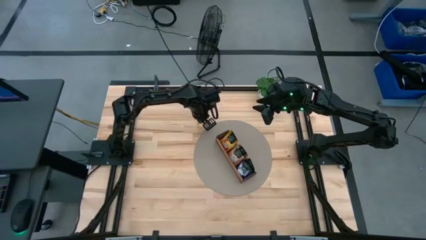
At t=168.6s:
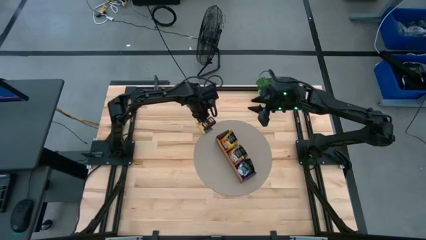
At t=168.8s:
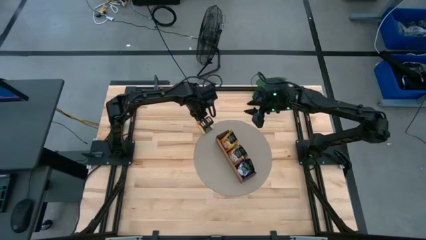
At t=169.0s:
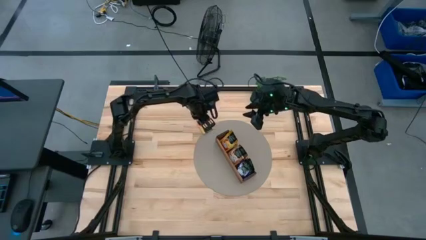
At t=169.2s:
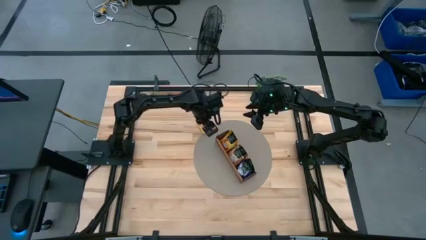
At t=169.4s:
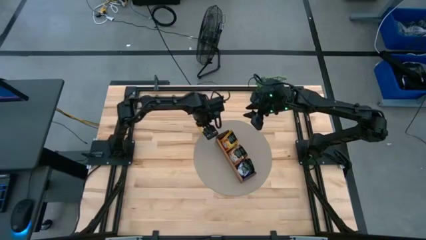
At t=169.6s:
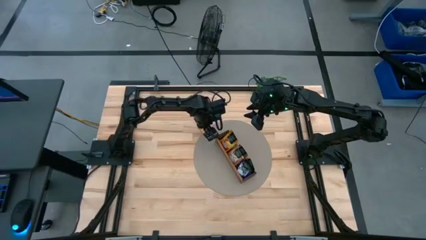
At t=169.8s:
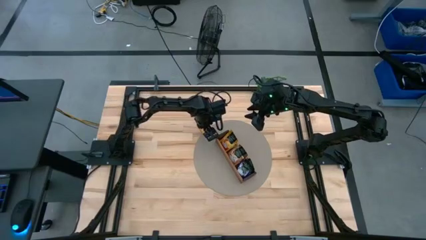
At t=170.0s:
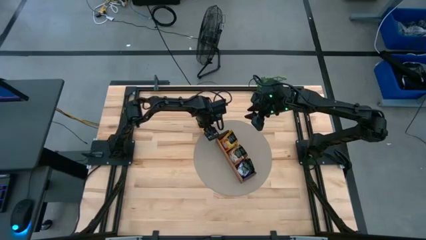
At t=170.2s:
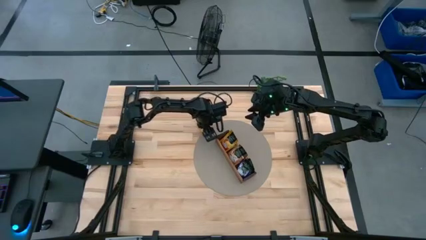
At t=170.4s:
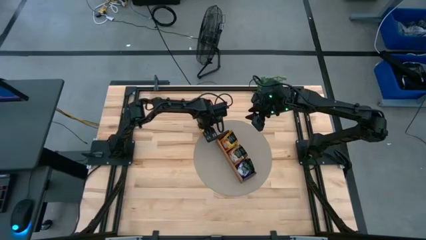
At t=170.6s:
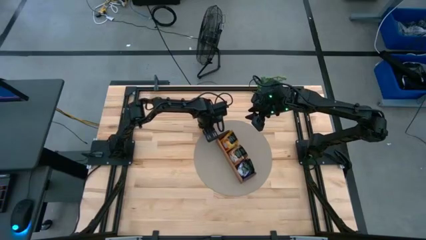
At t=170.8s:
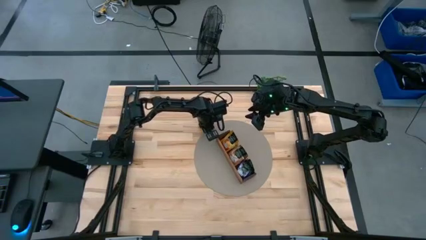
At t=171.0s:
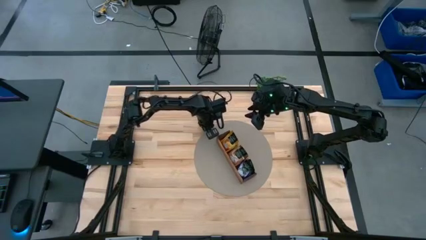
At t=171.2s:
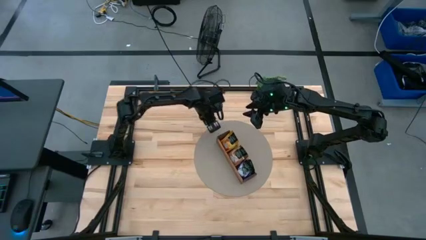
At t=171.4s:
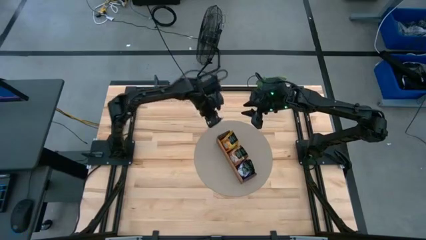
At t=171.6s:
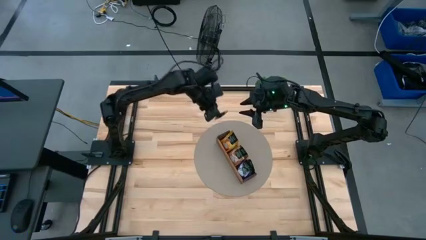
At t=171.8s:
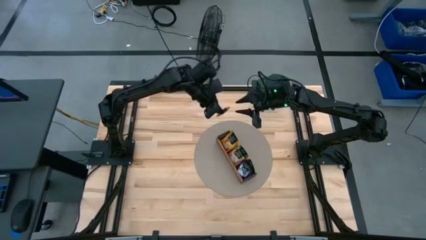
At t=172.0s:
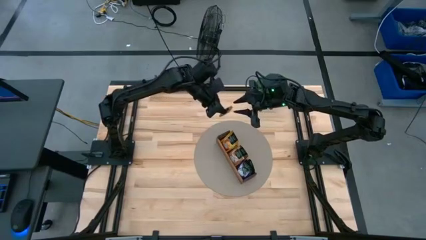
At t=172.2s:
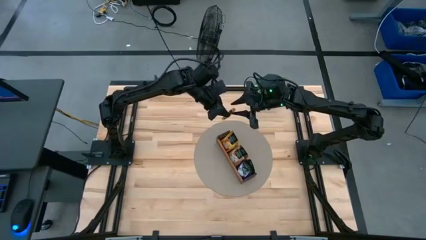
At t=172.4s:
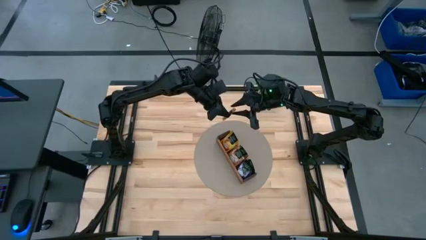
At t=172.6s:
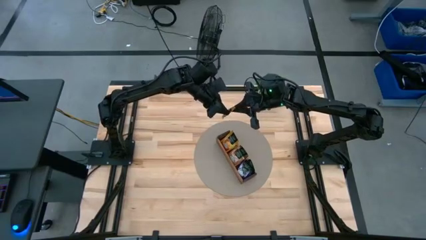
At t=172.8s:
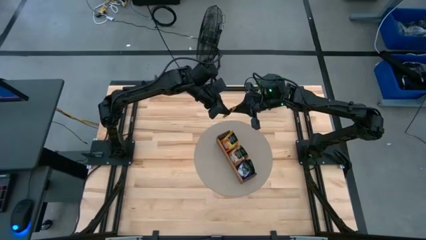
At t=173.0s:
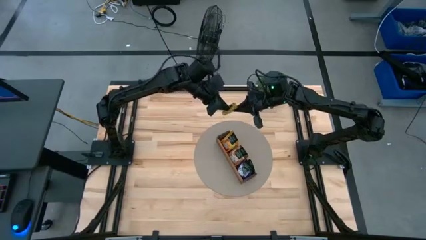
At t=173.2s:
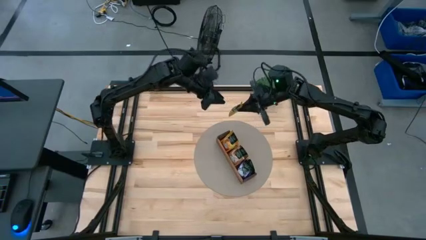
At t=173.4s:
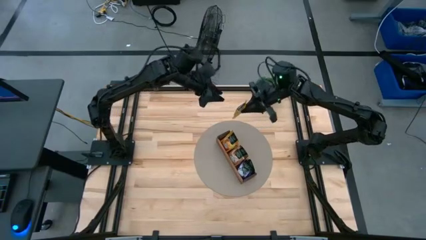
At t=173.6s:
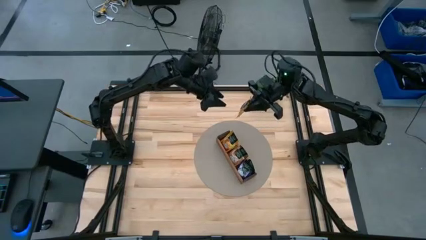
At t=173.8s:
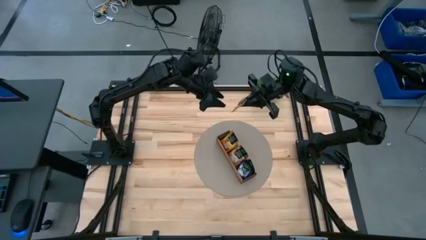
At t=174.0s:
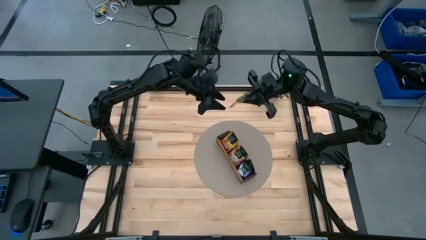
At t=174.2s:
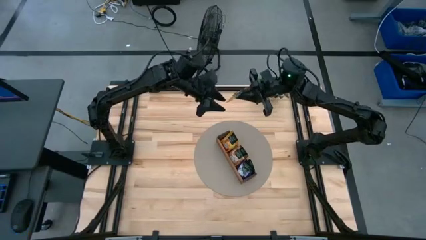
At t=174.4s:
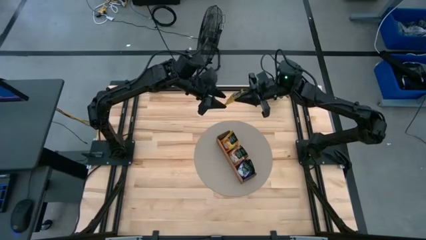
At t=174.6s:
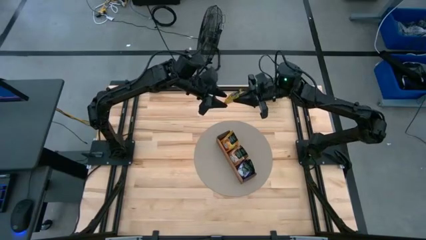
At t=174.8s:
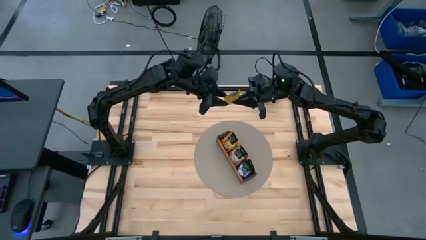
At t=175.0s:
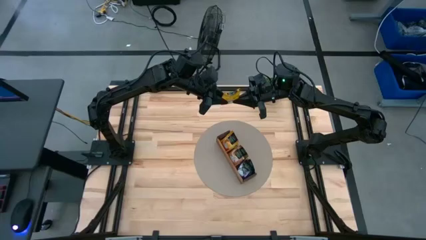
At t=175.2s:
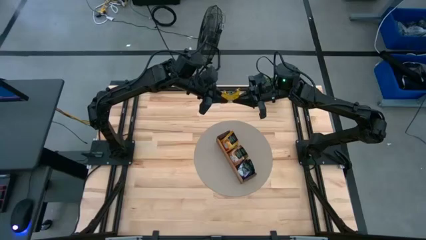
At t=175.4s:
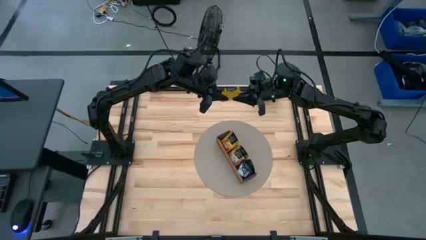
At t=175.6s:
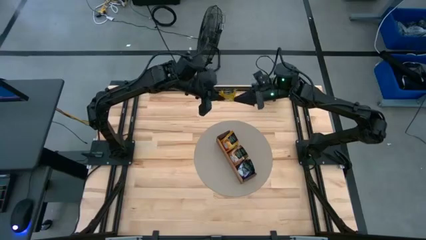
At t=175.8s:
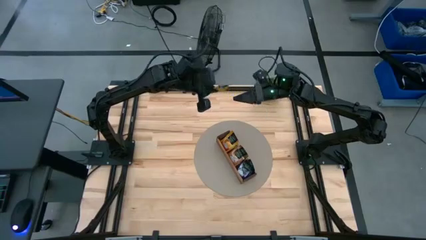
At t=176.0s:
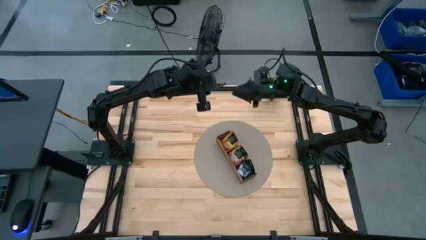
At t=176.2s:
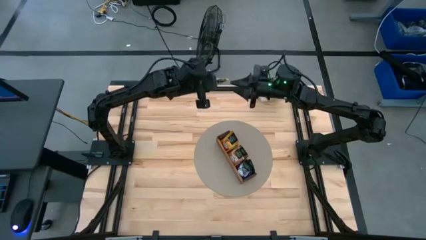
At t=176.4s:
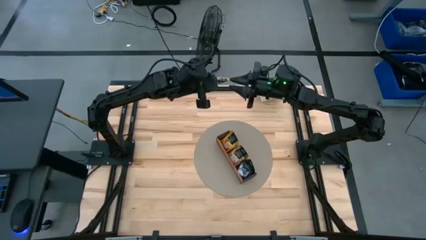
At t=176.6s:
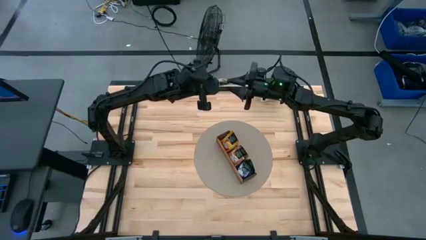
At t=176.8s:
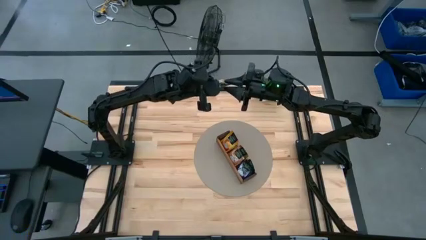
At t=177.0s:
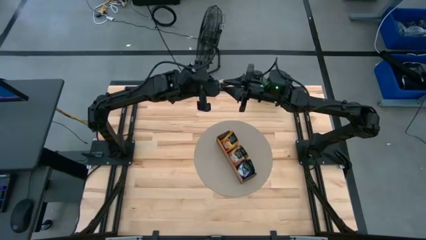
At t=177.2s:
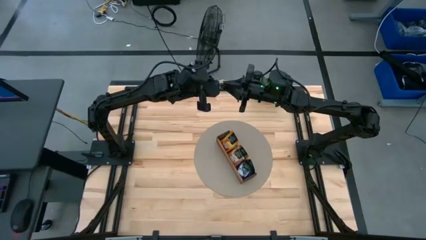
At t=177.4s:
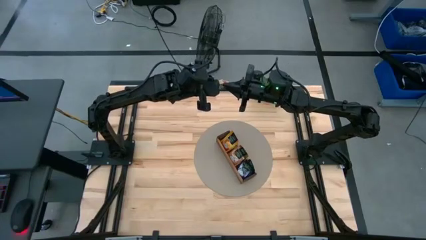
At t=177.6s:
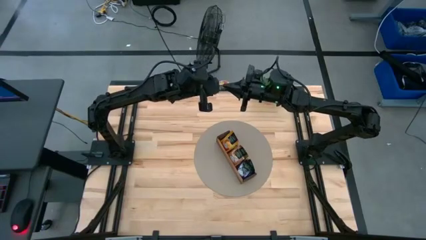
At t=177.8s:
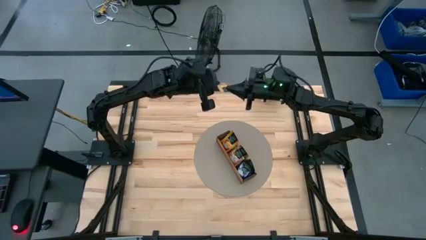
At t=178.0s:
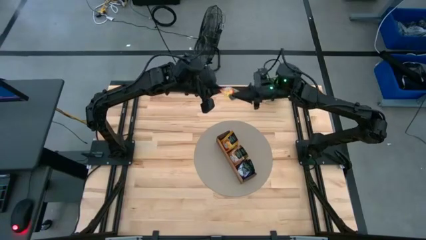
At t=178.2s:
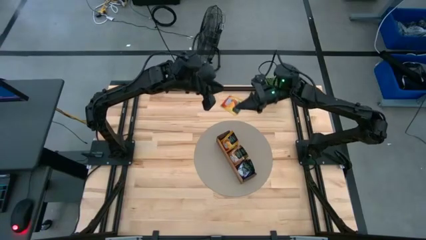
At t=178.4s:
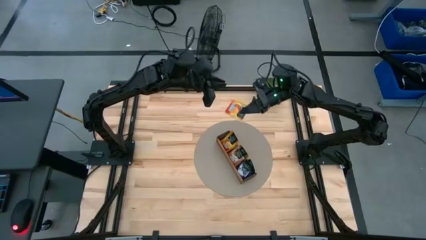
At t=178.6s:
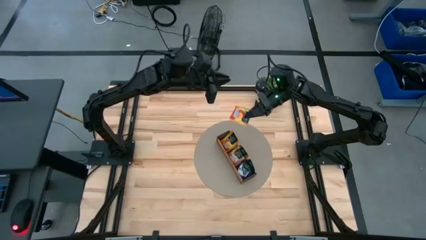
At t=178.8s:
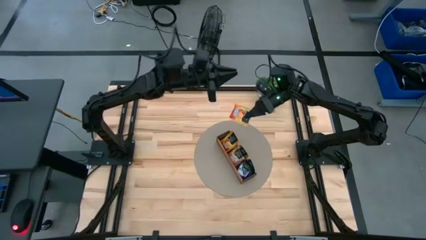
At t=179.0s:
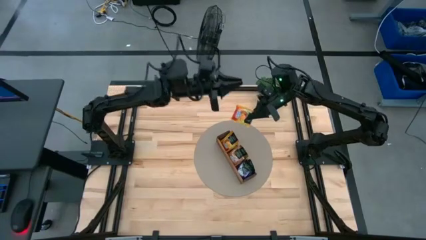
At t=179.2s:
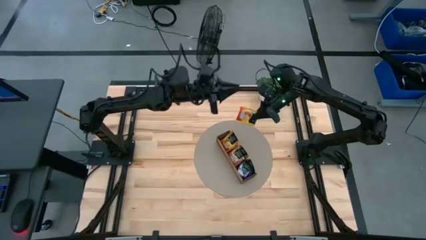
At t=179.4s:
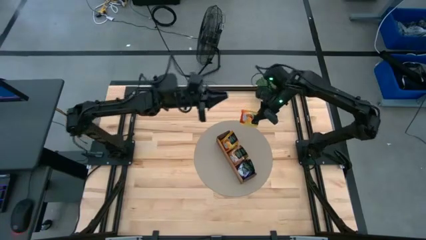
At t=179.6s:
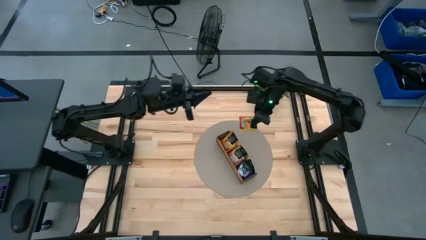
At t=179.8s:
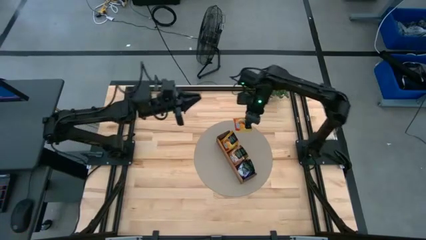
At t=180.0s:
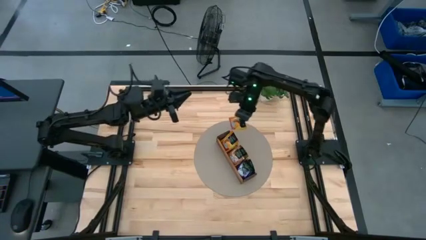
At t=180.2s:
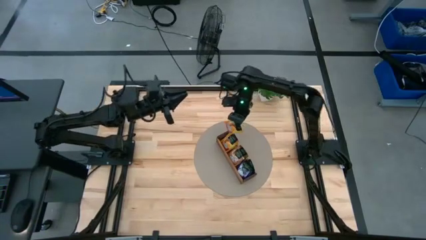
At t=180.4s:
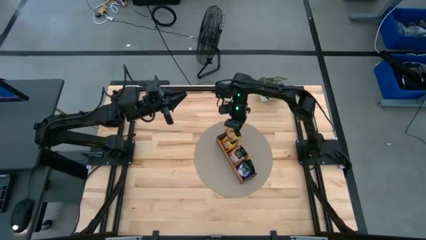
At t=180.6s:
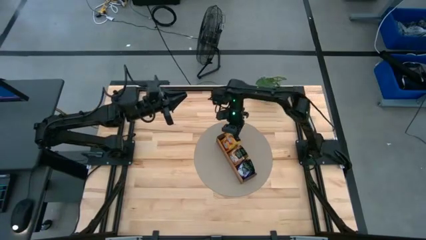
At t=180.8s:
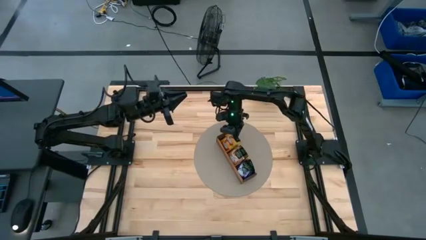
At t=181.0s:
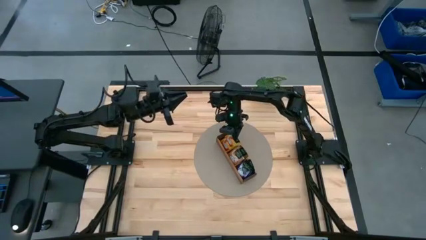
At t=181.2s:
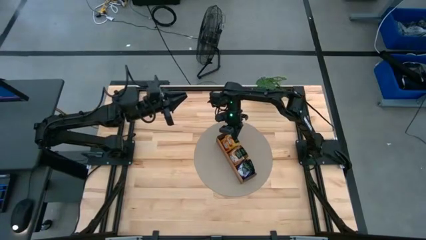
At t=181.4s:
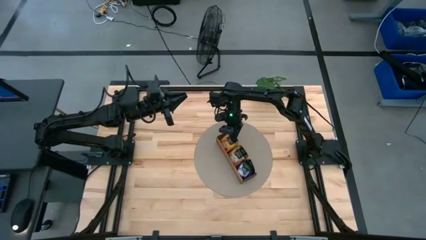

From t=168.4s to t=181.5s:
Task: Pick & Place Tea
Put the orange tea bag into the left section of the wooden organizer

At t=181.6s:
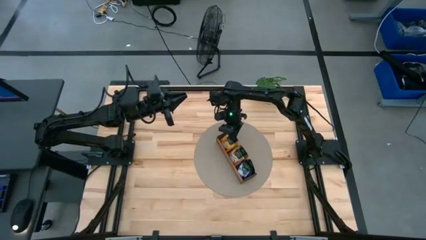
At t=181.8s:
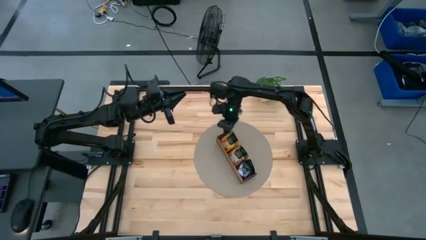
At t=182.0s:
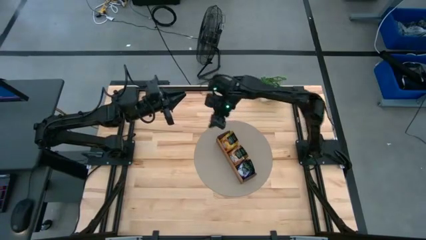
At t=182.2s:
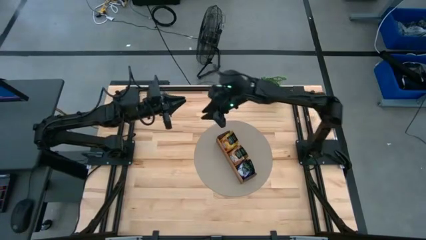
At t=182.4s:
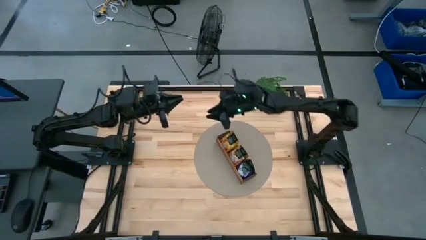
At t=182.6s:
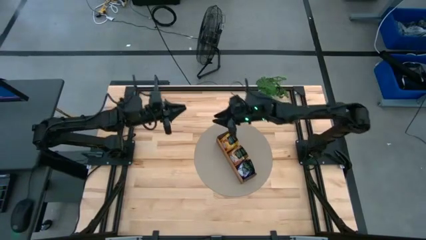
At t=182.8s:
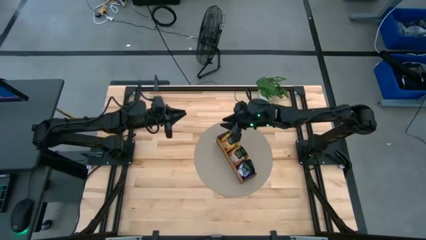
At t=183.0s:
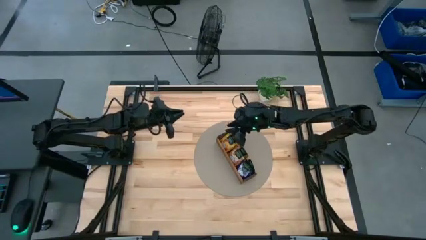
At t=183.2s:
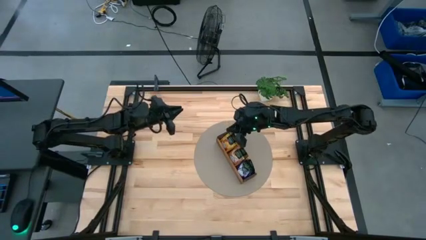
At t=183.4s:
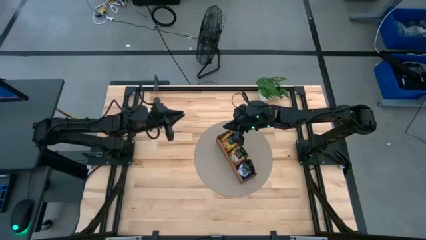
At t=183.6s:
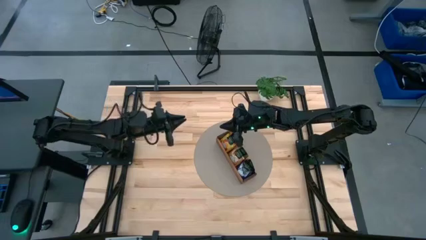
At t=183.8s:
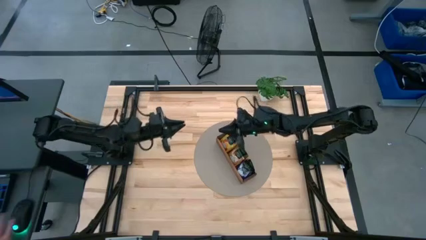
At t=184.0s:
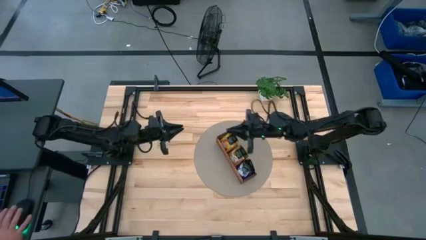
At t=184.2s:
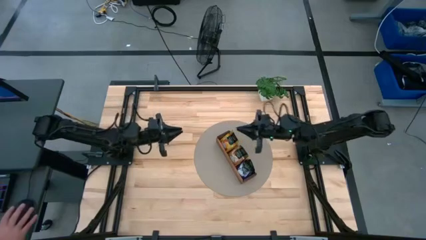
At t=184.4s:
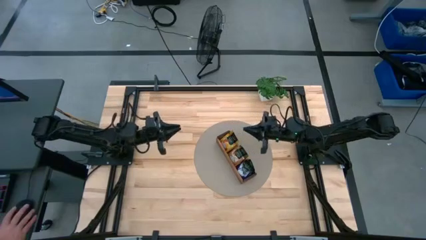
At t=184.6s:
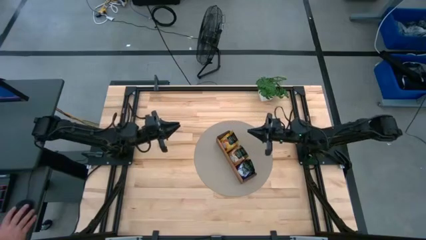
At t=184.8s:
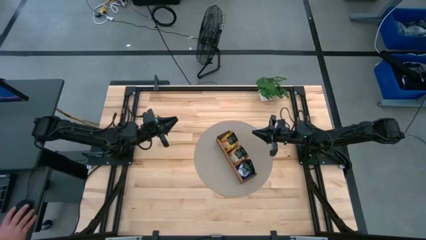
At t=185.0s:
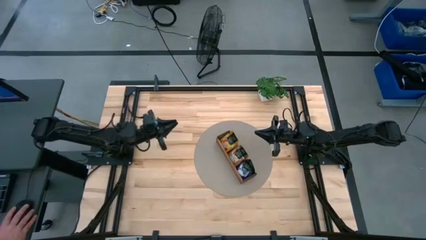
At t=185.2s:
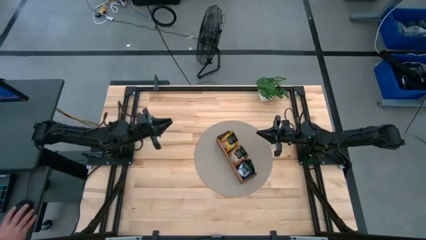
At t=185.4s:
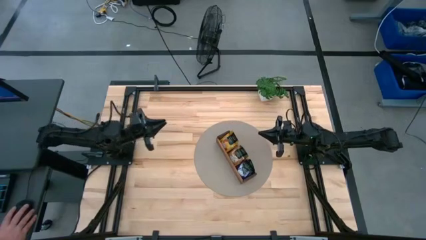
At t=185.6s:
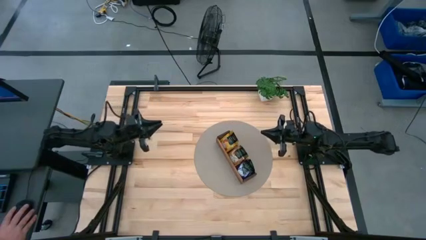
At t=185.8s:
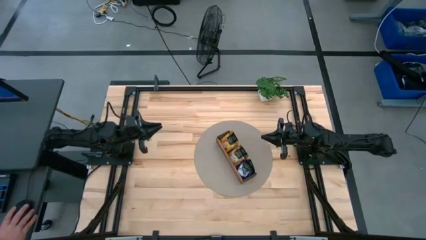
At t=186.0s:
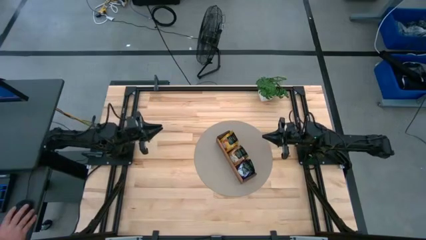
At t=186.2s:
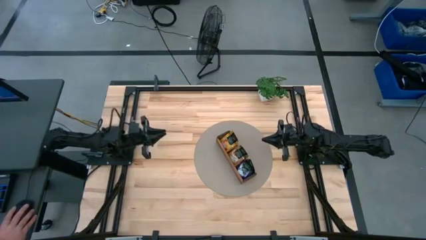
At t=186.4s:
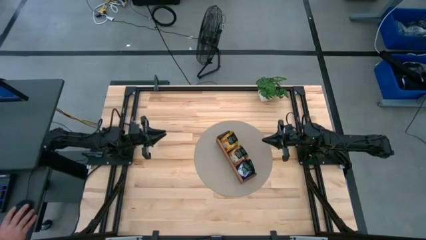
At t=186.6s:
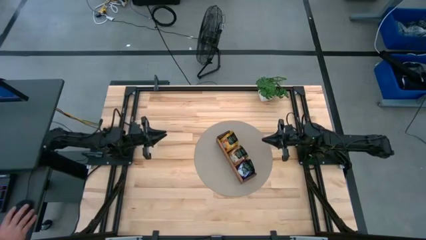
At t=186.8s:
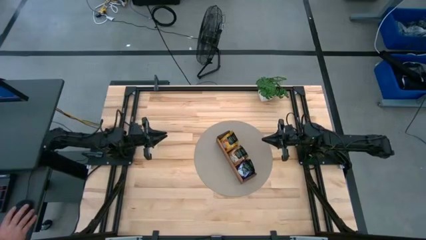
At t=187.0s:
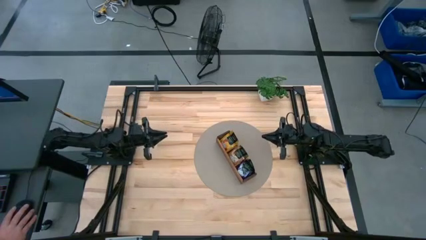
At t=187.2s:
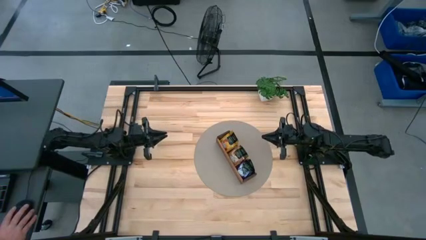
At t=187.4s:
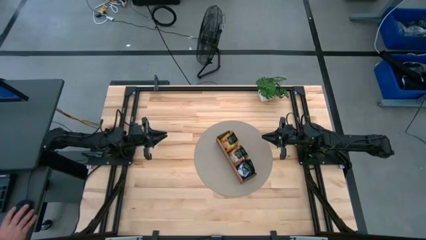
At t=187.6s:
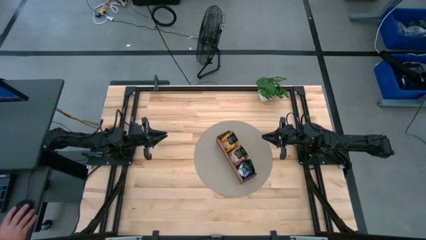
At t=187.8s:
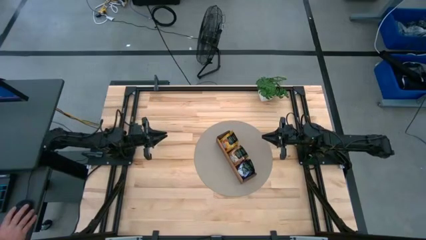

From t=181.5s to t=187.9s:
Return to Home Position
